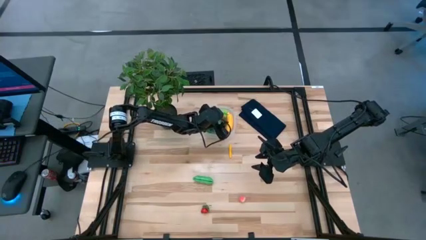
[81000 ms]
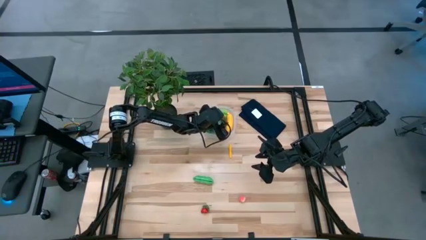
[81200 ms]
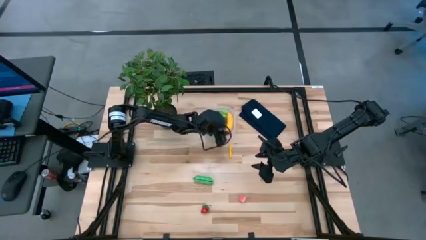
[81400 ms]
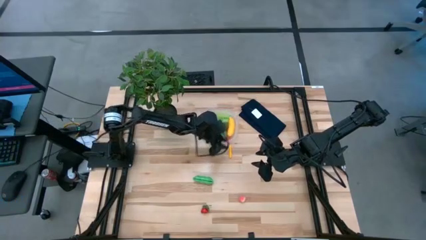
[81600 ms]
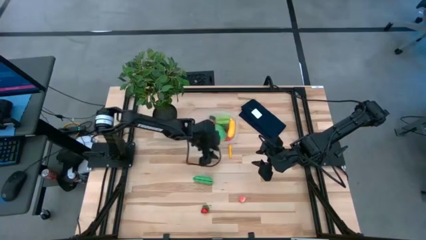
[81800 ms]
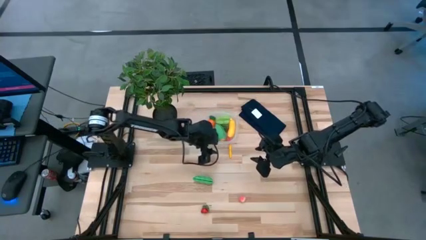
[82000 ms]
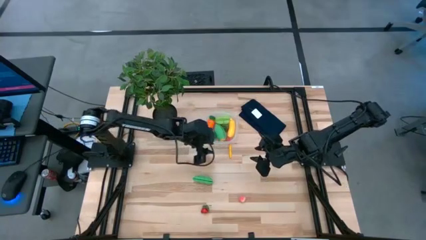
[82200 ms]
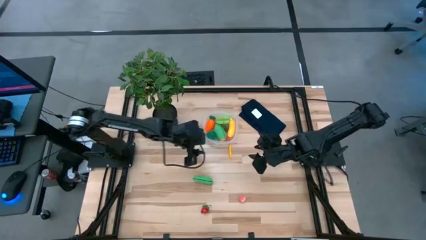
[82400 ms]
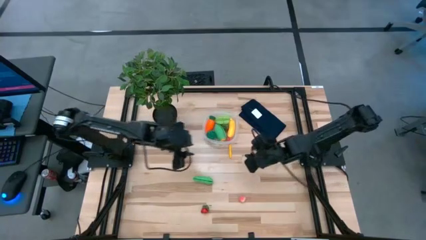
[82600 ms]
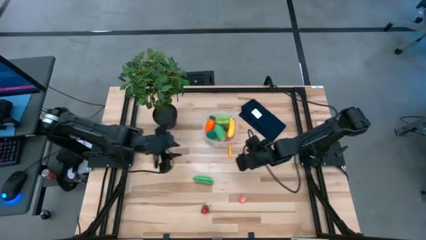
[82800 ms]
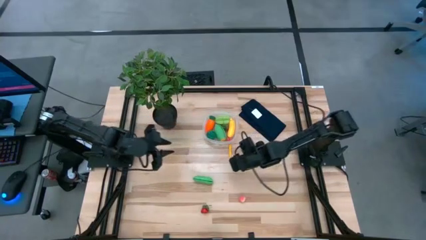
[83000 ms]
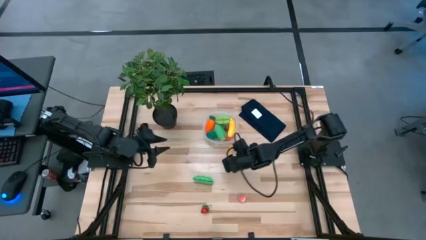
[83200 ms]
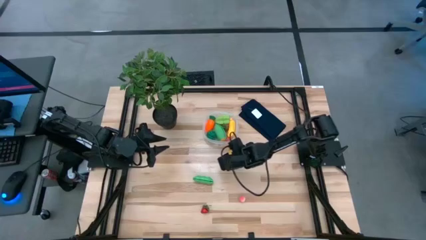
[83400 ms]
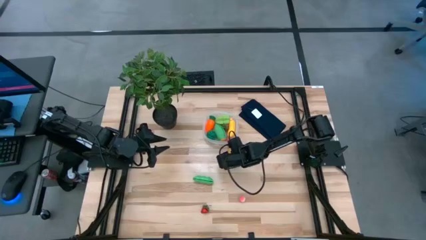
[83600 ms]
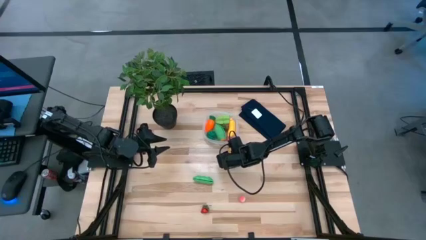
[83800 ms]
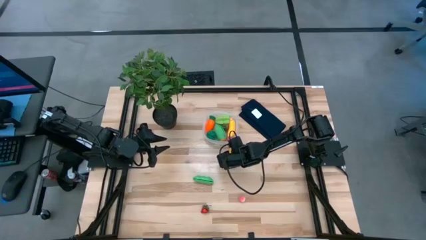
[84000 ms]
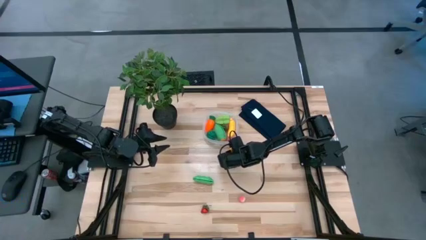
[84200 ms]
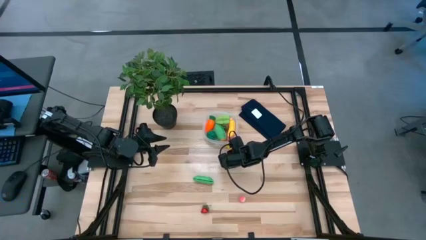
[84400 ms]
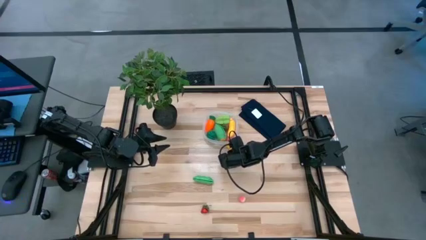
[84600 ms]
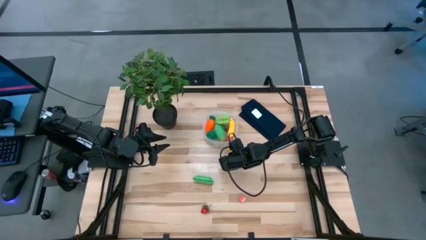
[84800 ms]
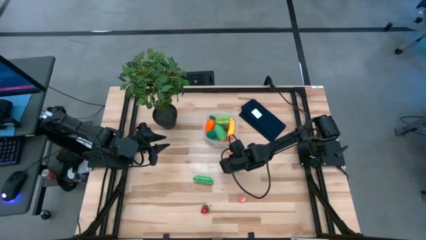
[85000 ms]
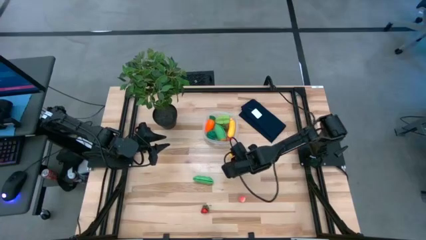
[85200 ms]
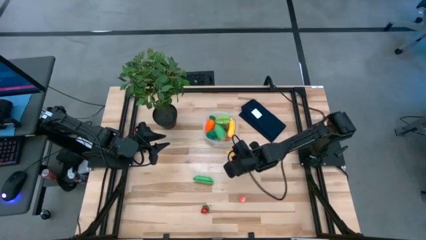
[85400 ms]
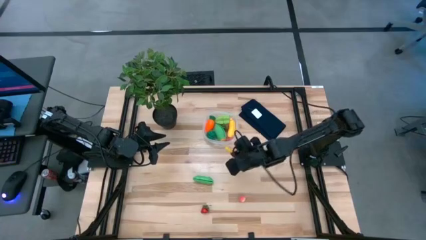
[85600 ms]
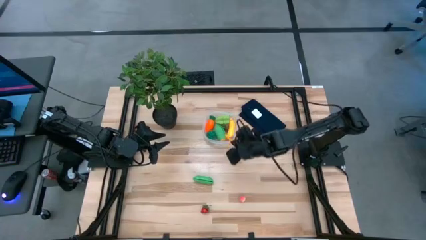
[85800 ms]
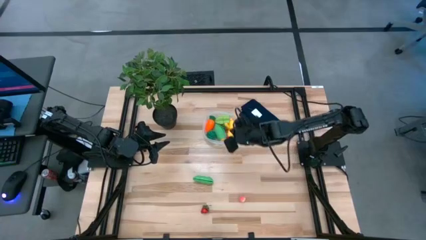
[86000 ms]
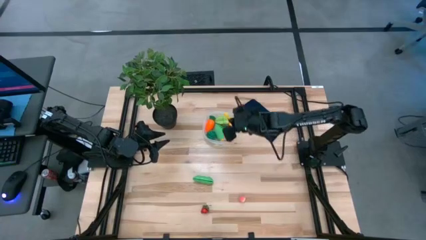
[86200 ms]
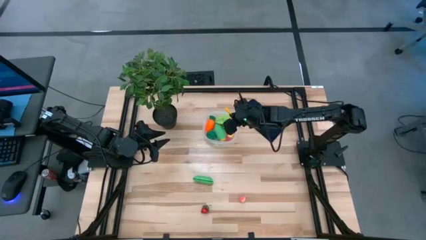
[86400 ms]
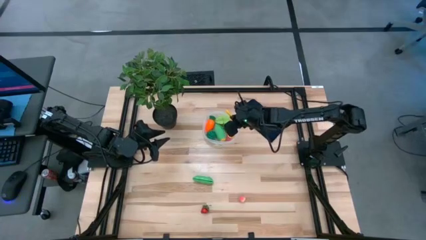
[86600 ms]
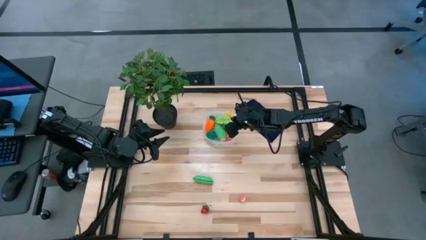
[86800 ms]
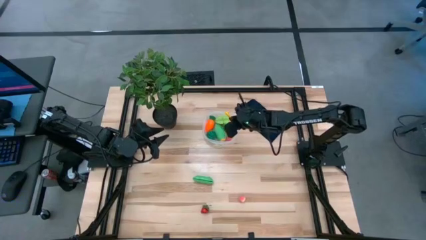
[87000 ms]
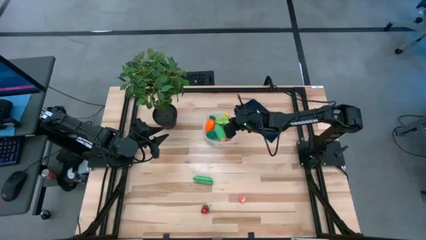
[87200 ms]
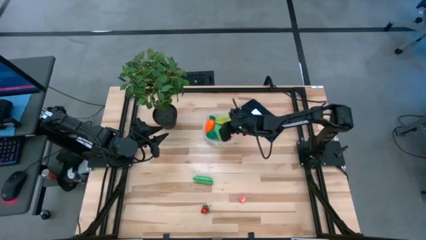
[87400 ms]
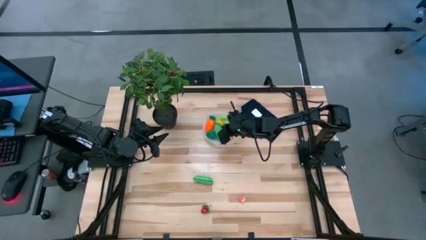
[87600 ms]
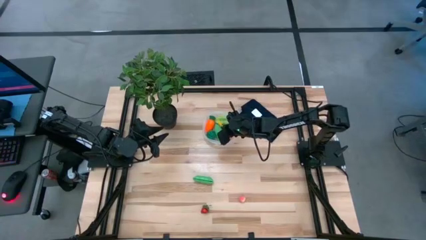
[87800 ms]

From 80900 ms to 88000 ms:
Task: Pick and placing Produce into tupperware
Put the yellow corn into the transparent bin

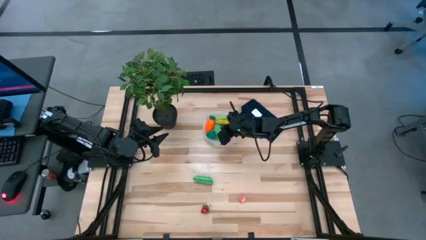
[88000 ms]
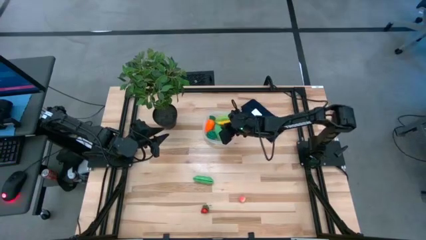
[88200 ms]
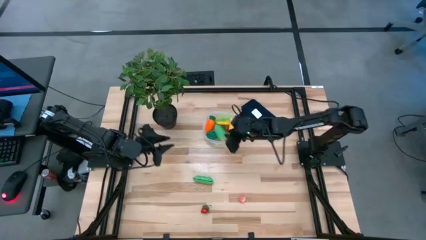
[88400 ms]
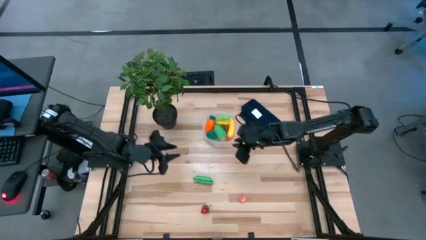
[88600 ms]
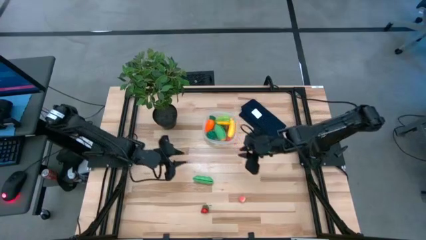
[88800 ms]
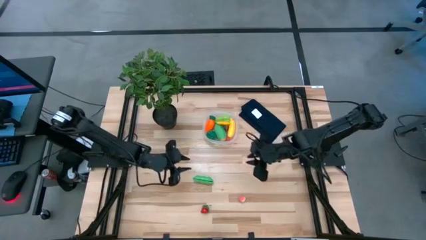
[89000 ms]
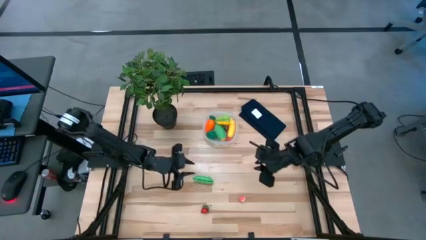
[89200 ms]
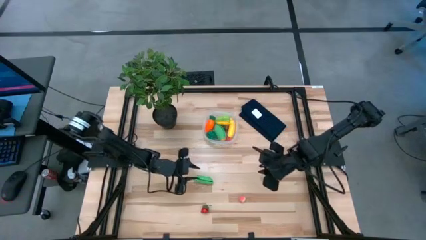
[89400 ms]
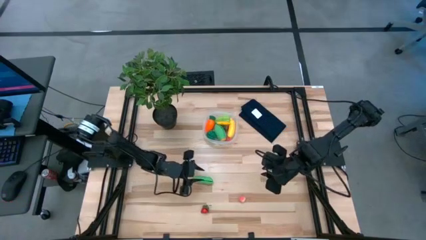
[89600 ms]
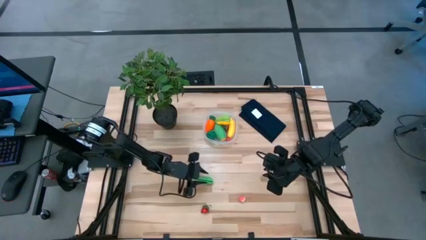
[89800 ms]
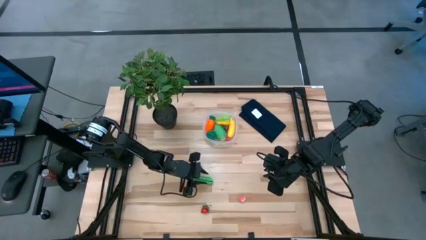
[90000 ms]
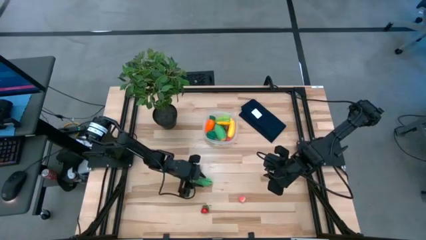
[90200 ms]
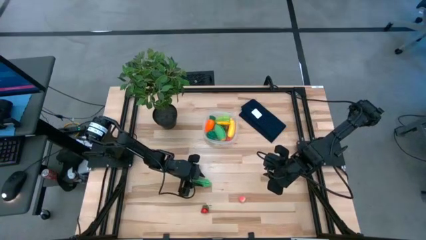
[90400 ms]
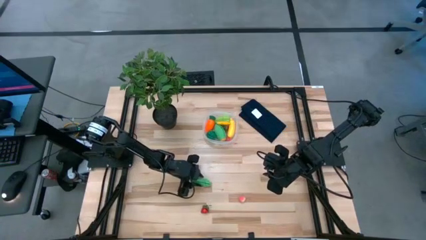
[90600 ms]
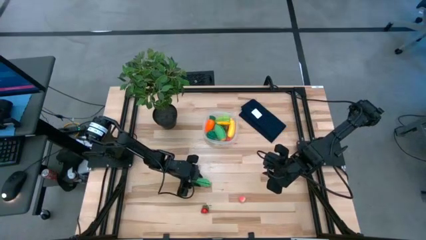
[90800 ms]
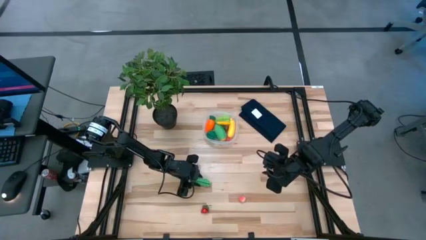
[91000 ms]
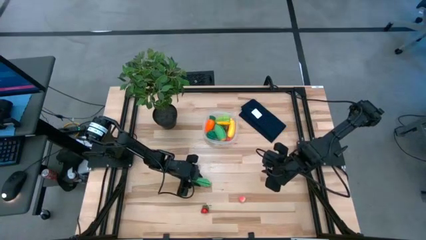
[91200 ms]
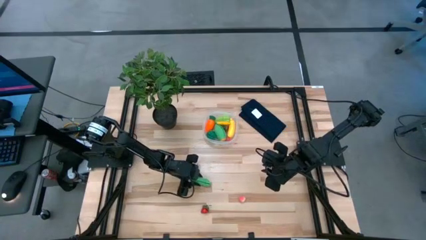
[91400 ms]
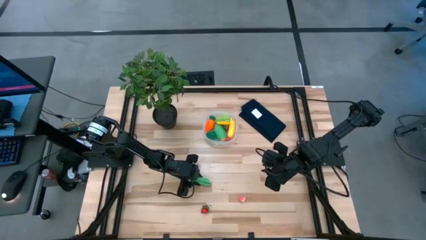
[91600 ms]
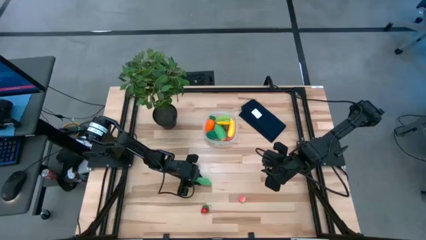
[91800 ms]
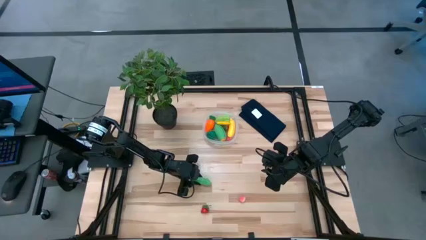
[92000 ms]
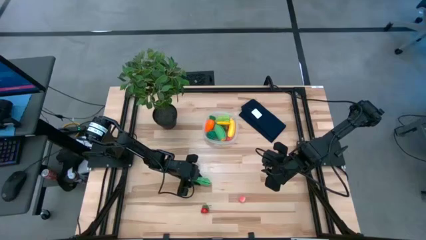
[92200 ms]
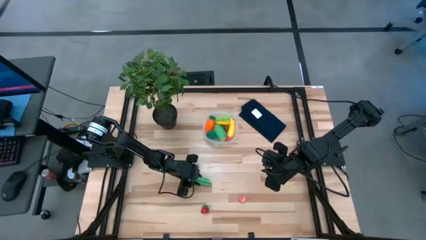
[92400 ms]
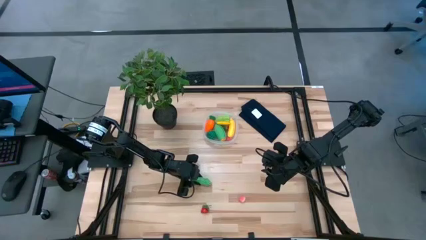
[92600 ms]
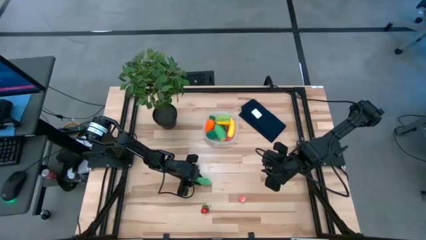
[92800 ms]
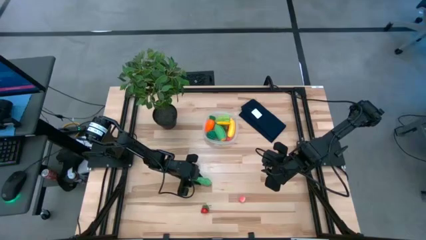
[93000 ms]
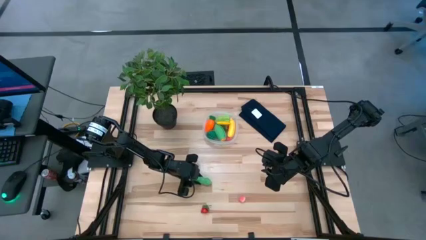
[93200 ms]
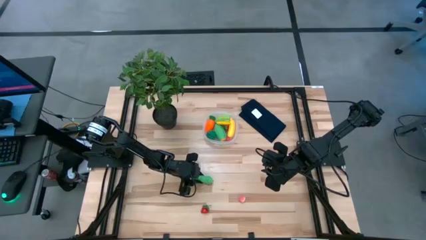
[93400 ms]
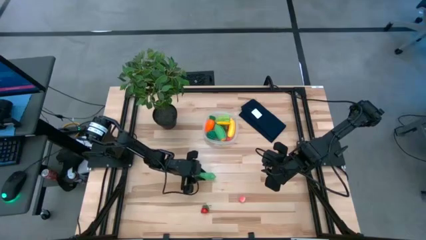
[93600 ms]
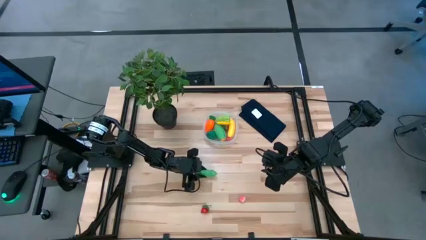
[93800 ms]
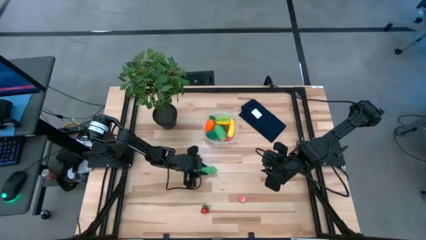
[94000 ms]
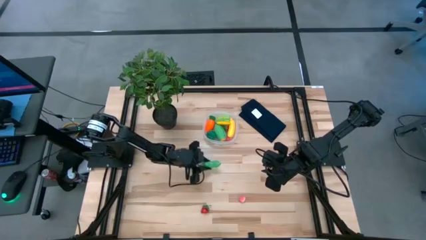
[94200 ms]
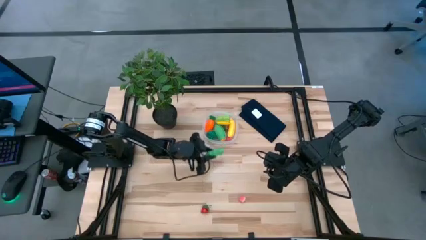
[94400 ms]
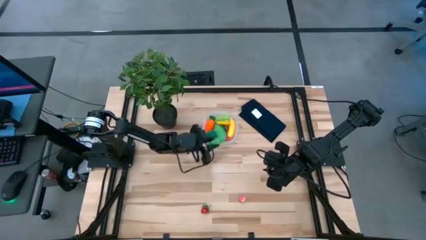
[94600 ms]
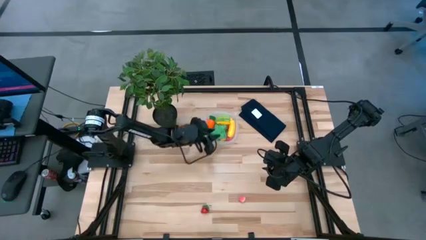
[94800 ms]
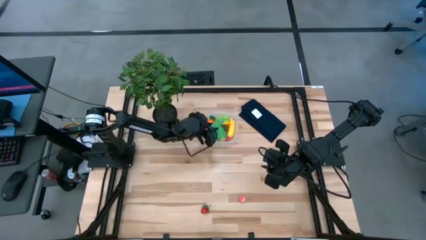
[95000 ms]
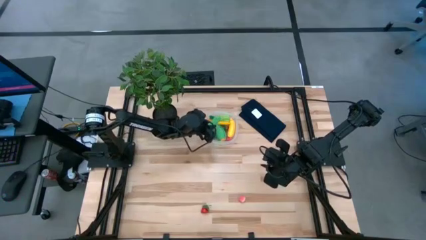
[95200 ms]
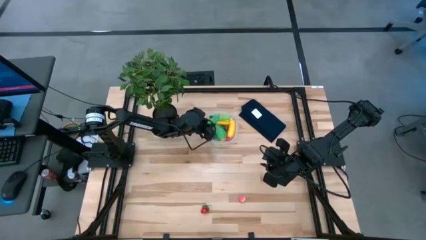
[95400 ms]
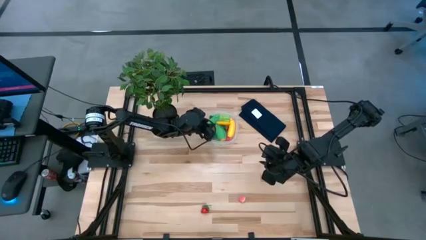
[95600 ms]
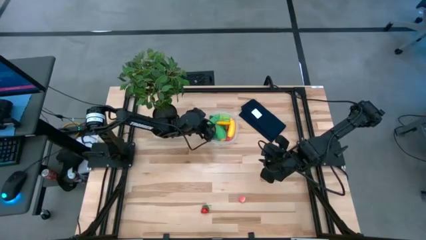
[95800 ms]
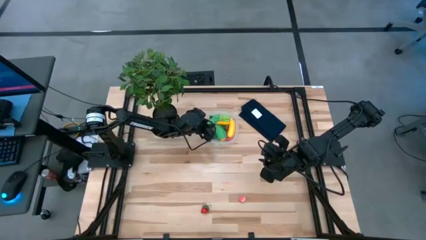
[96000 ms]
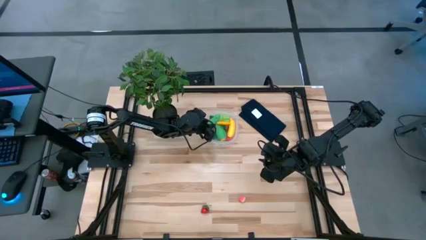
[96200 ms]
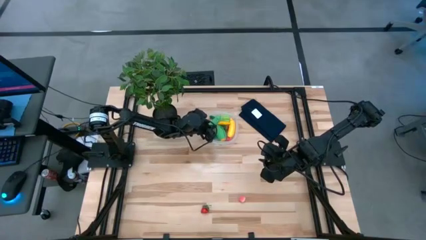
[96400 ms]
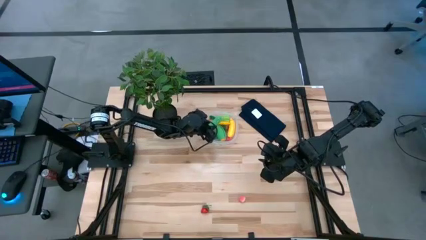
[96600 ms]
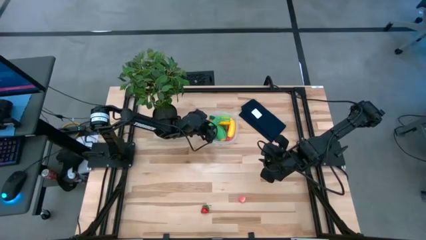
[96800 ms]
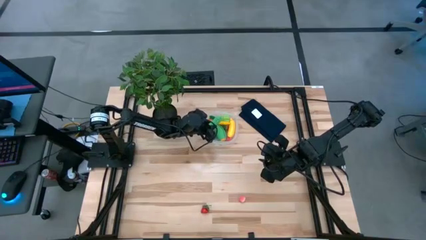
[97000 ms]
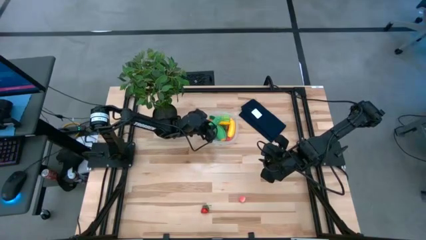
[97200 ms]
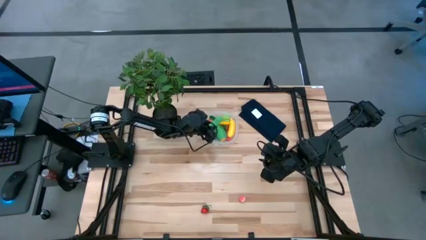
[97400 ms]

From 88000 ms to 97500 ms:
Put the green peas into the transparent bin
